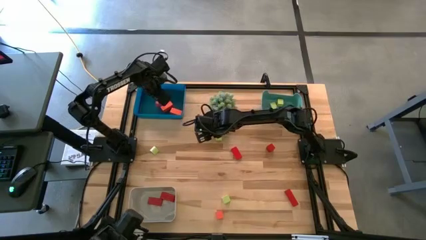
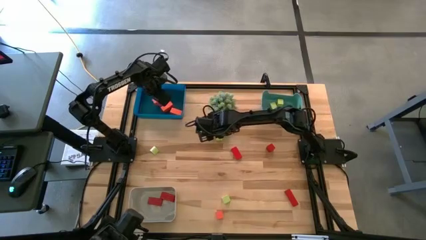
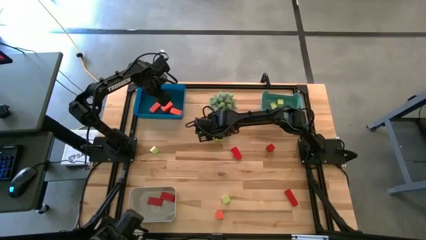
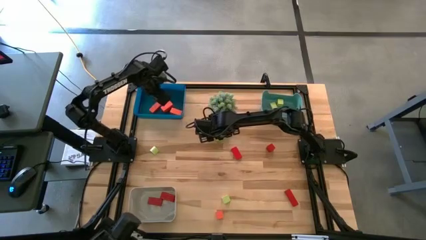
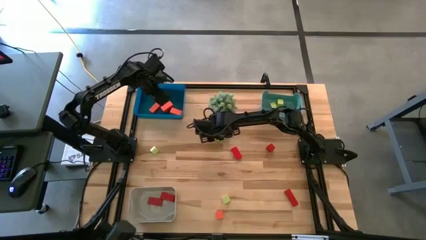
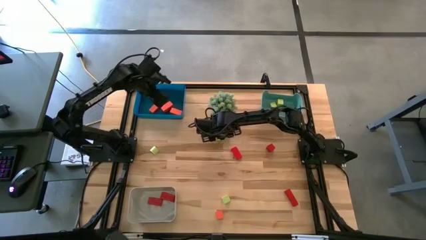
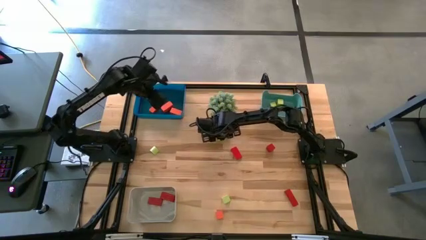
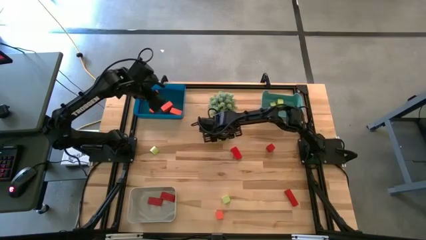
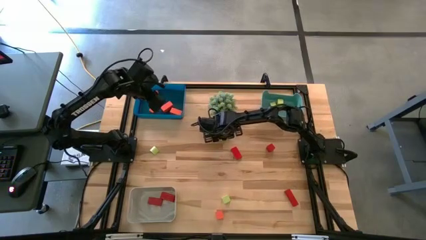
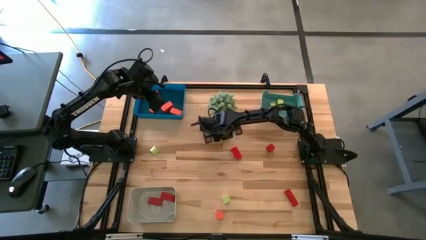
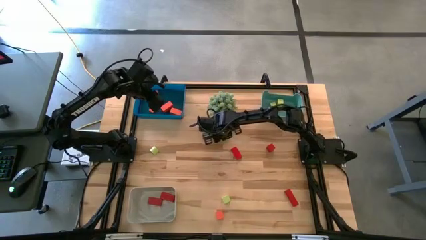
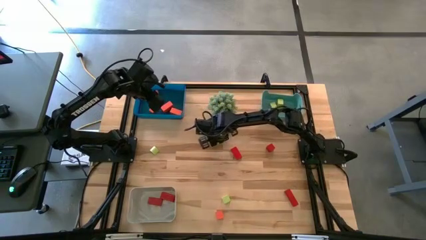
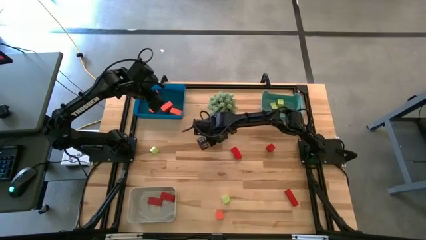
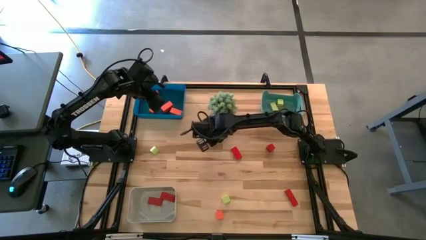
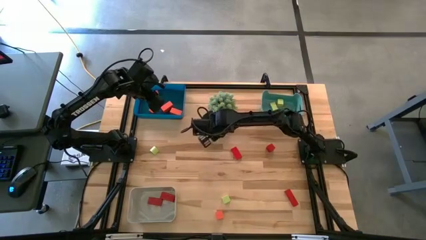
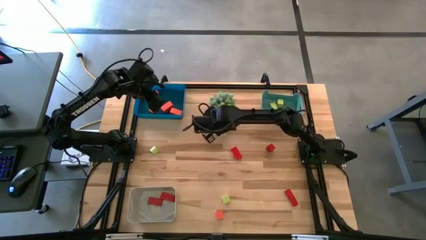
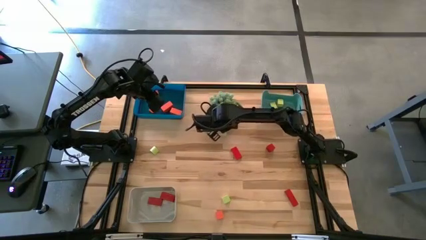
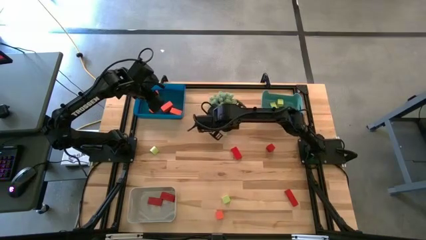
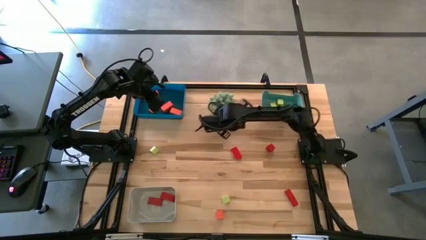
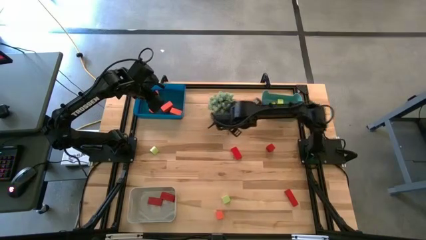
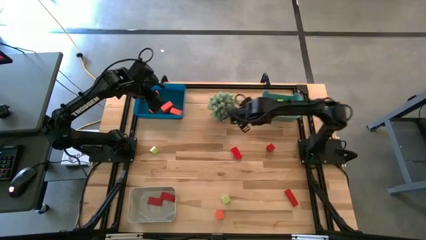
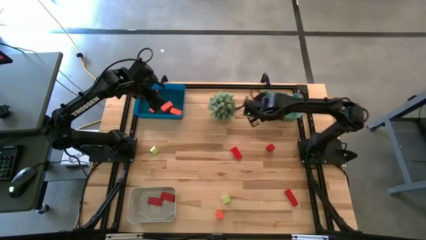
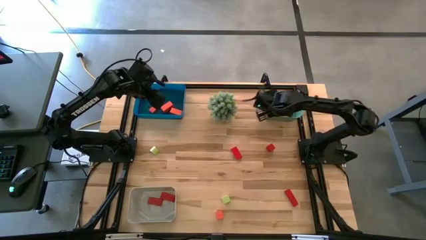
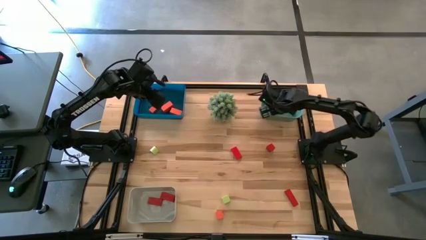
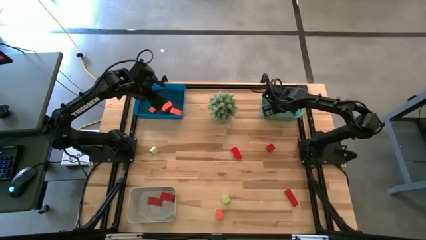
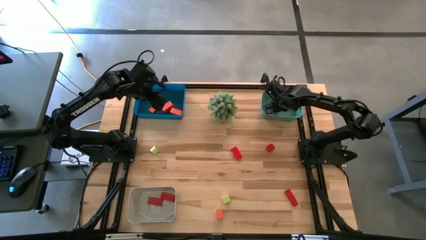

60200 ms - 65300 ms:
Task: Sort & place blocks by color
Put the light green block into the green bin

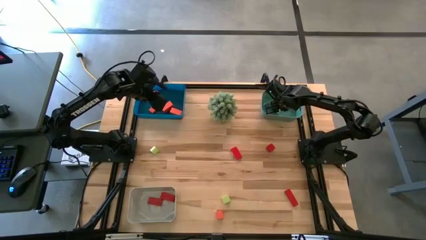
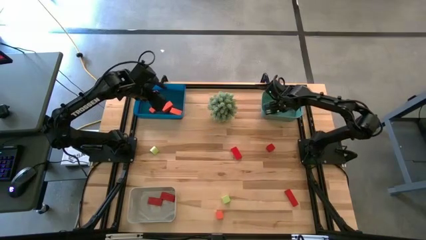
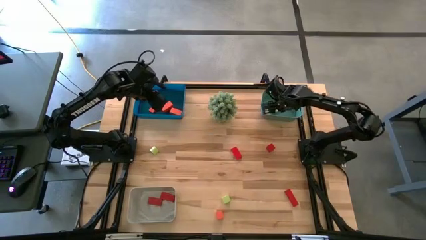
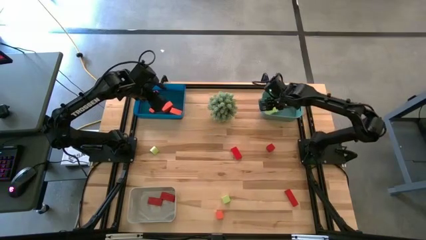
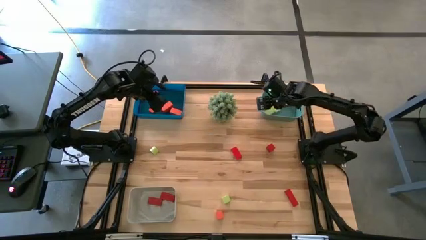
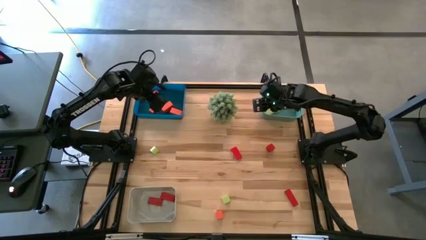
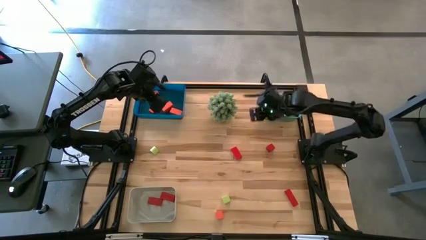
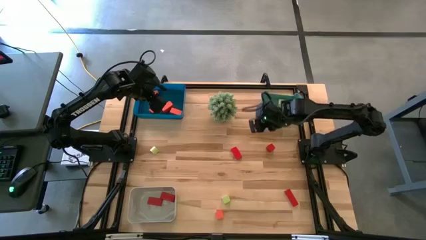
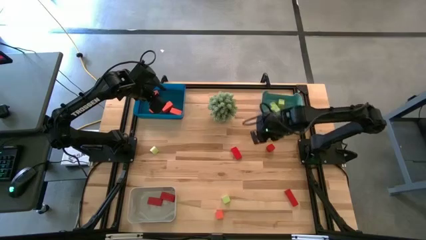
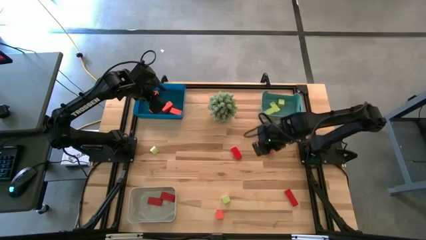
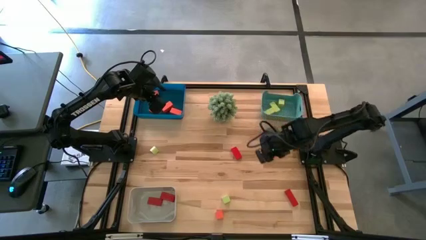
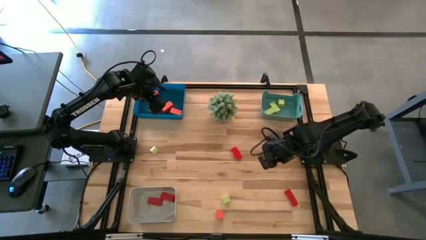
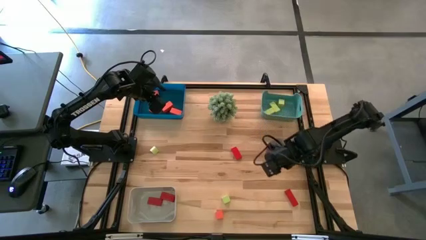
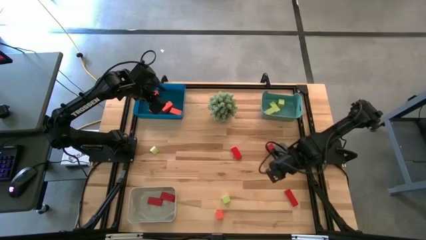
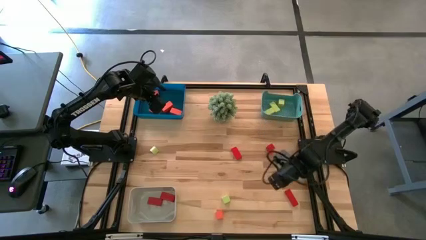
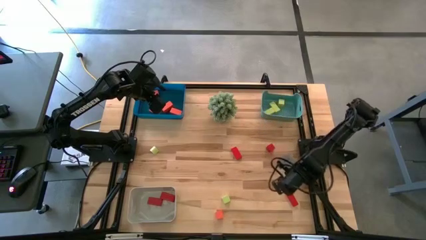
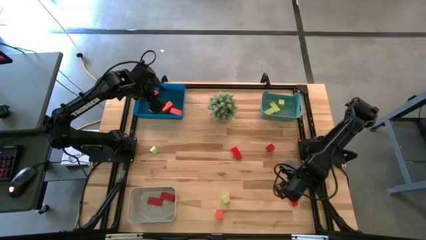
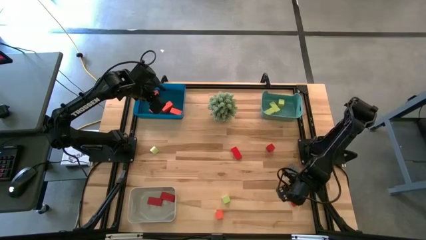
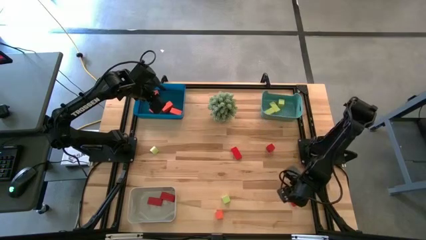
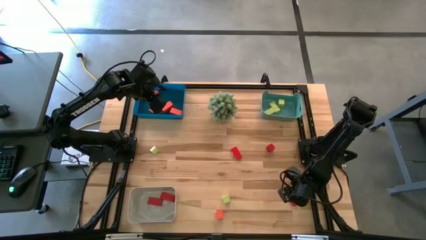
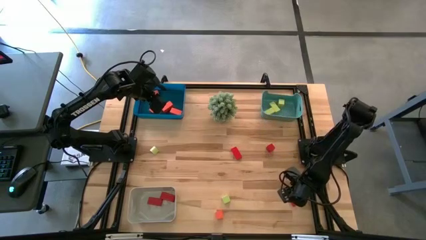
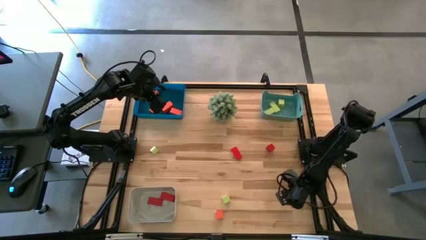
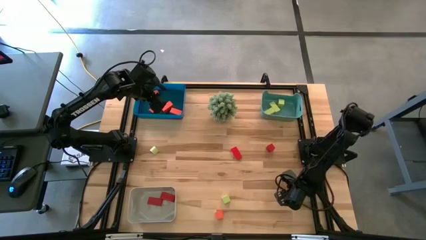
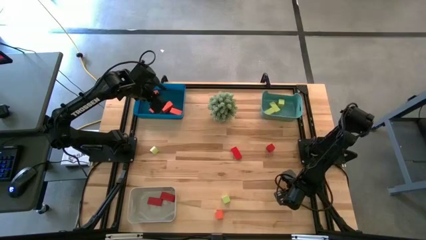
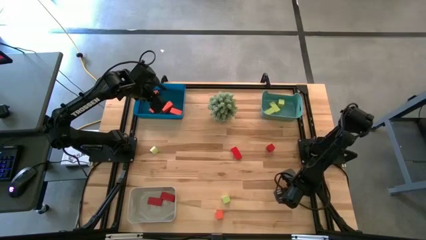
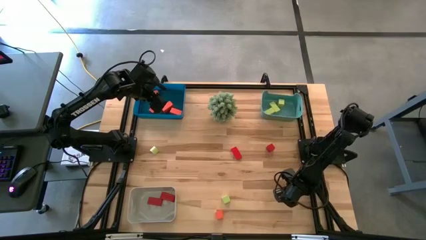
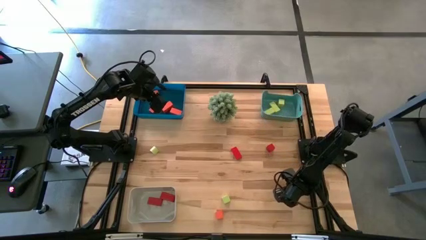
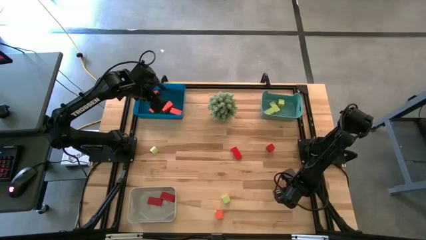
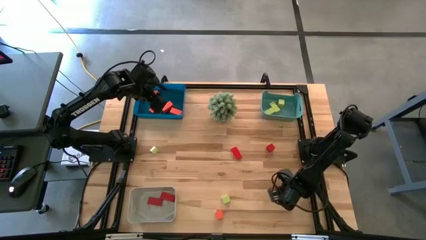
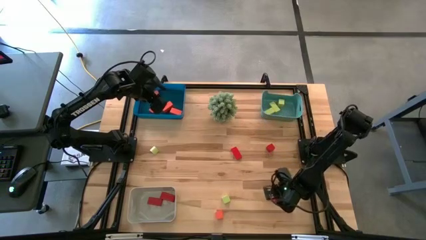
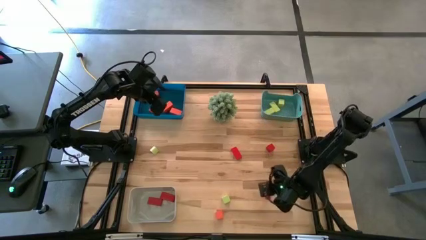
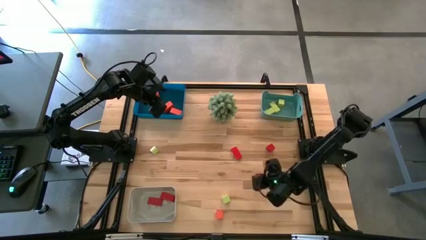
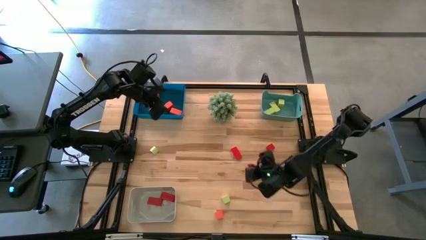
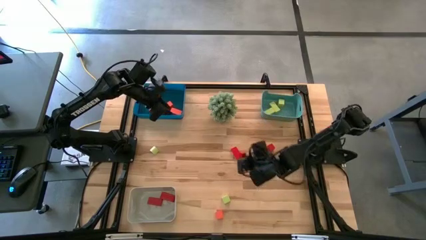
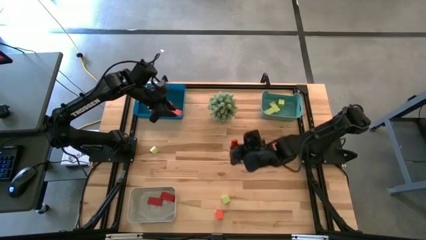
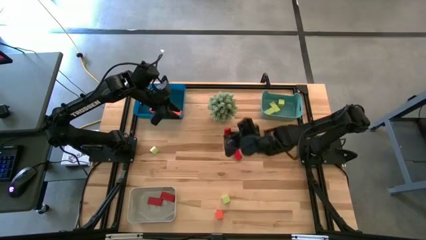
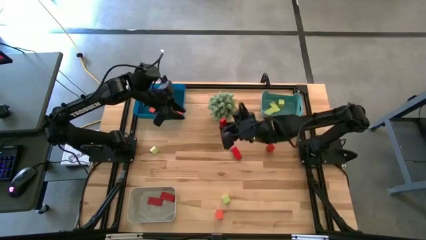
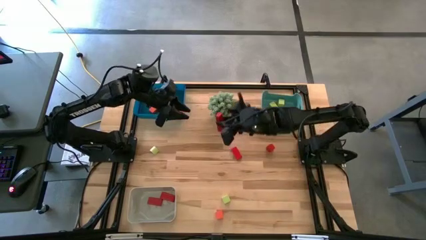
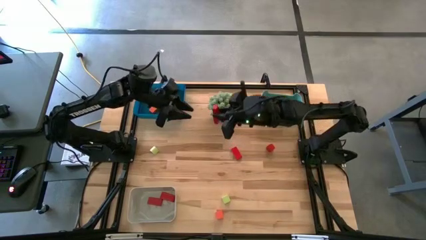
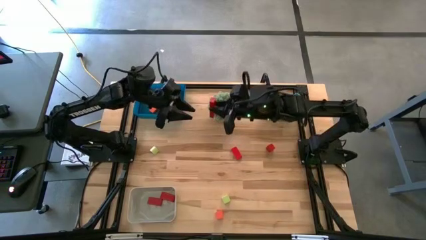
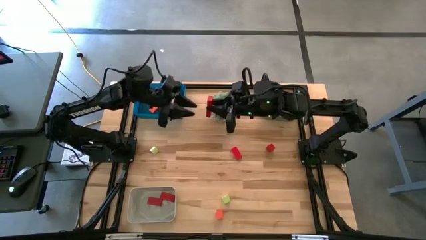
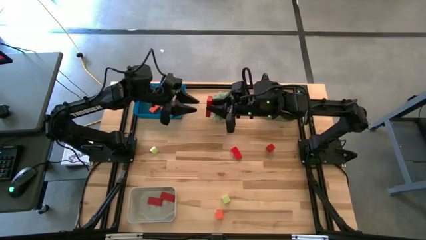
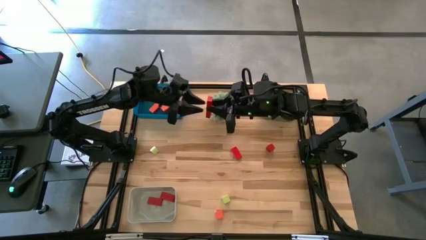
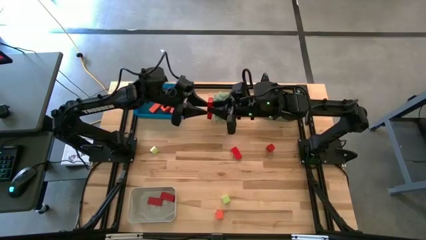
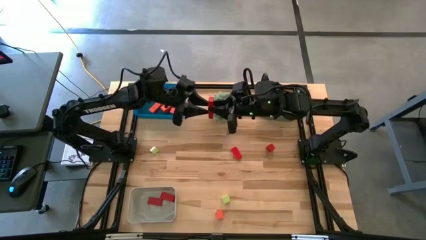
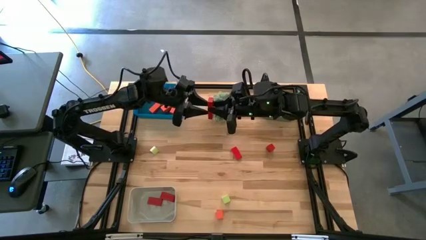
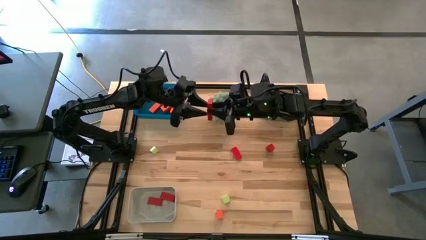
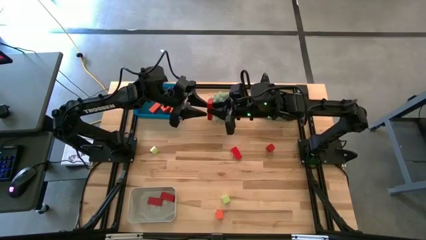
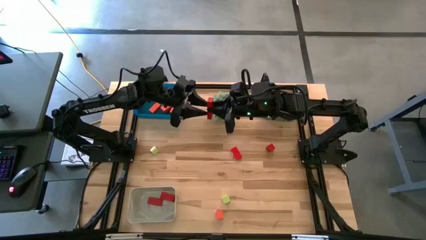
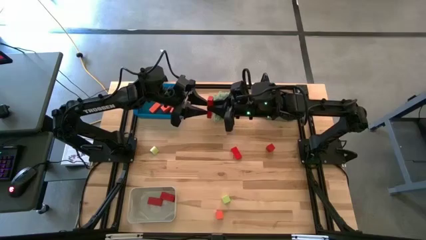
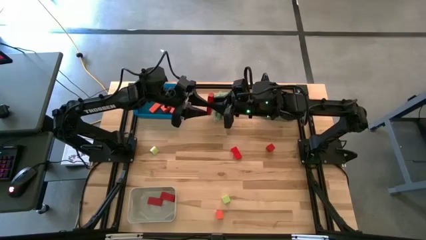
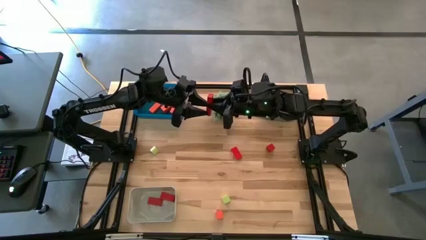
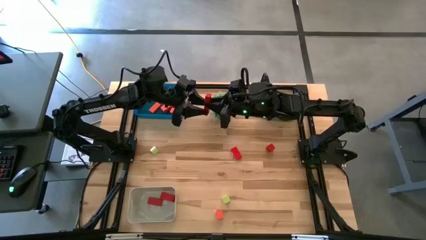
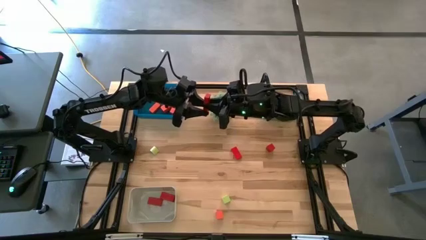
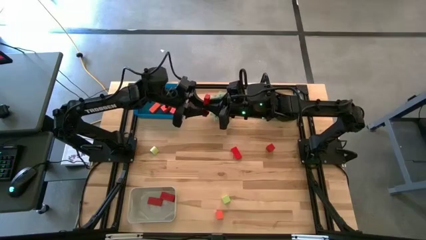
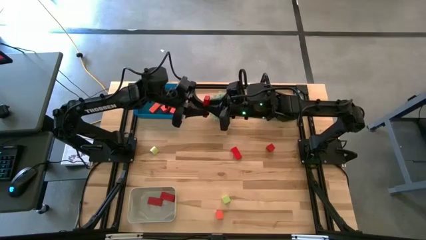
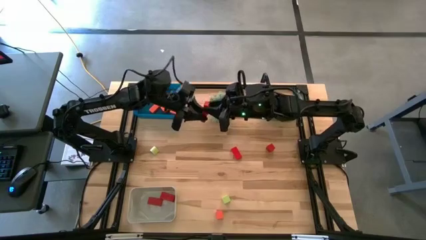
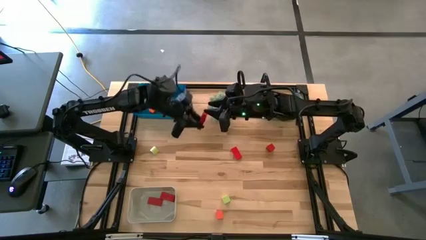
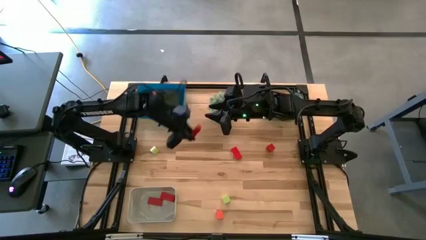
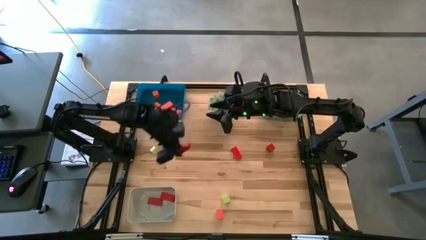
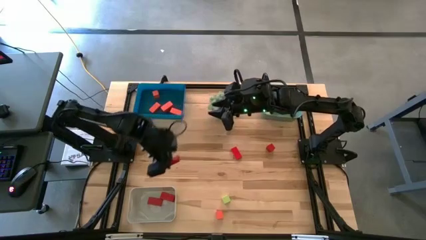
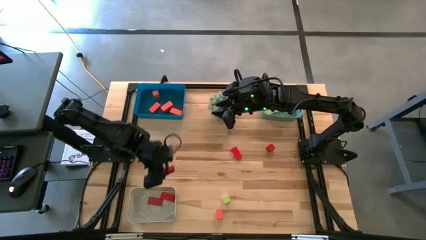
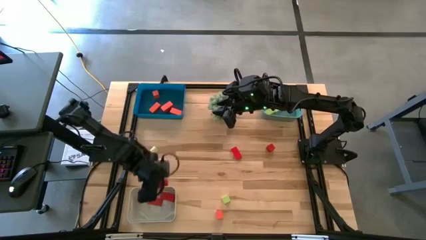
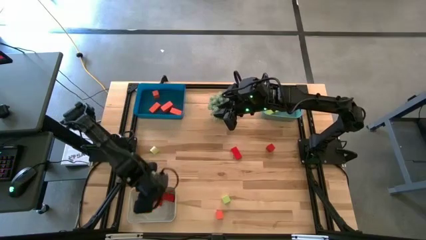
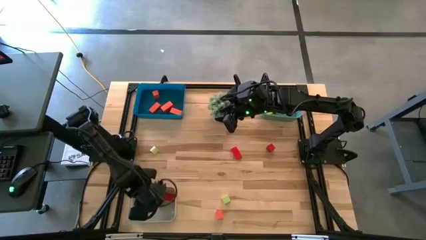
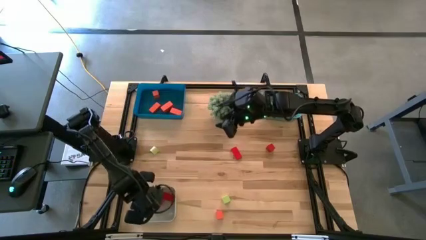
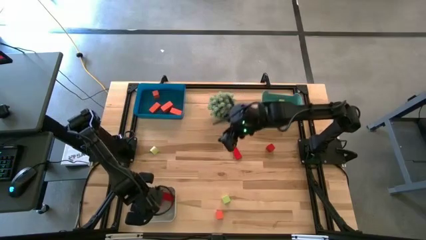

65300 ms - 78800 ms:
Put the red block into the white bin
